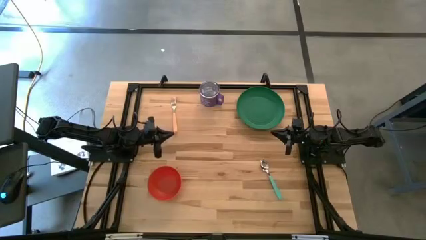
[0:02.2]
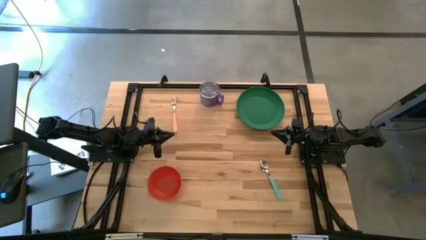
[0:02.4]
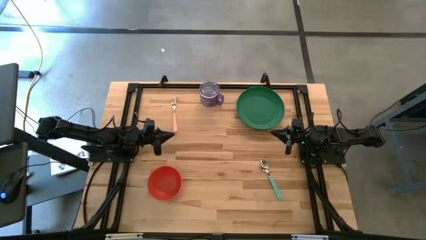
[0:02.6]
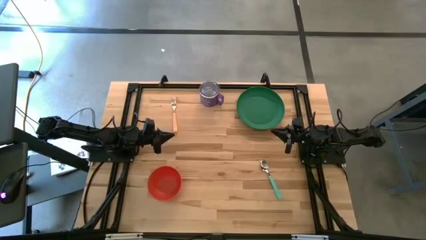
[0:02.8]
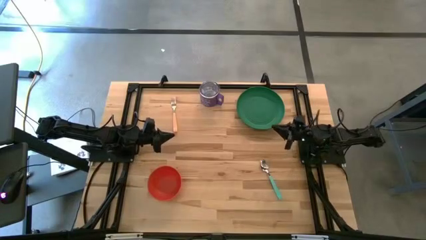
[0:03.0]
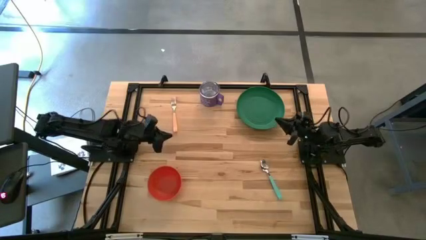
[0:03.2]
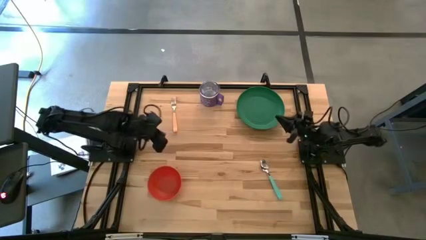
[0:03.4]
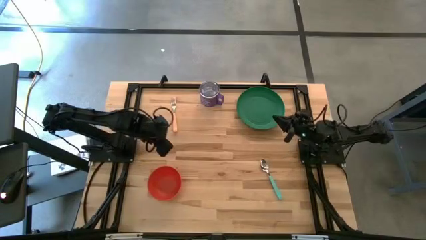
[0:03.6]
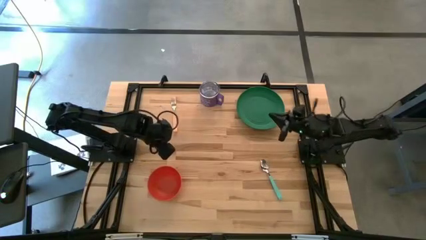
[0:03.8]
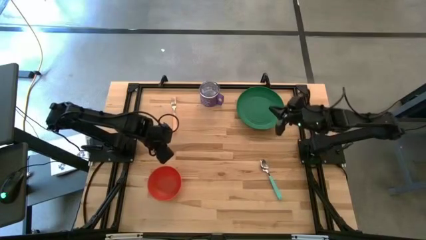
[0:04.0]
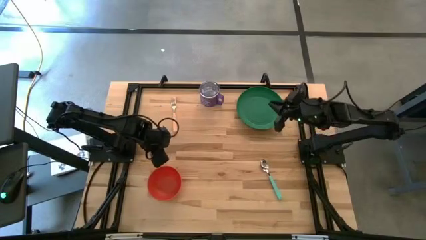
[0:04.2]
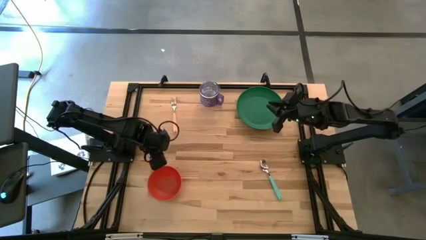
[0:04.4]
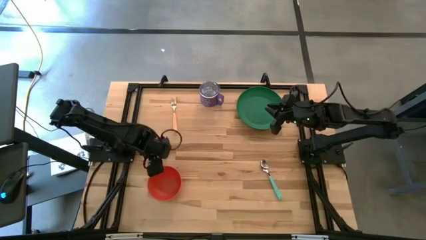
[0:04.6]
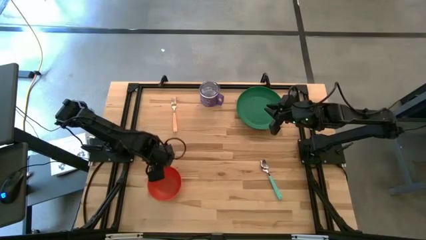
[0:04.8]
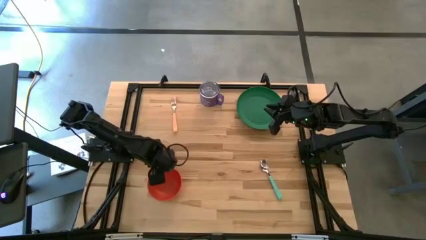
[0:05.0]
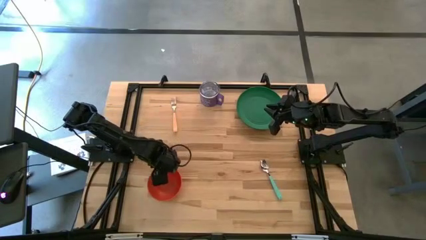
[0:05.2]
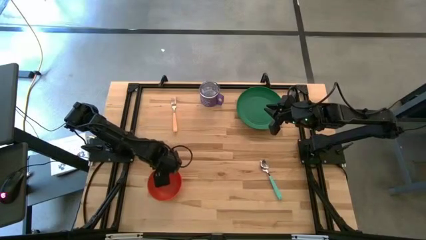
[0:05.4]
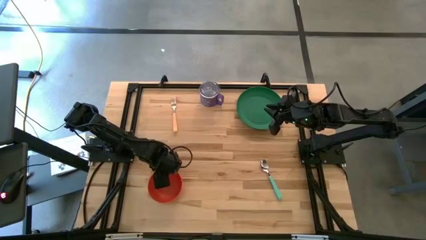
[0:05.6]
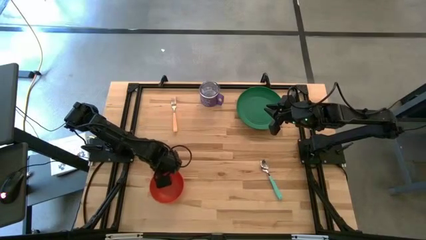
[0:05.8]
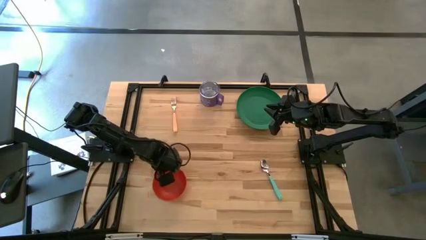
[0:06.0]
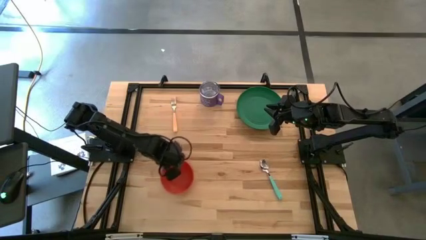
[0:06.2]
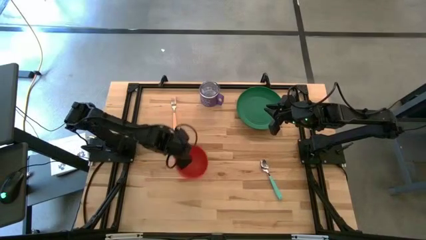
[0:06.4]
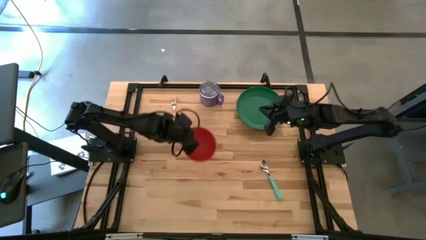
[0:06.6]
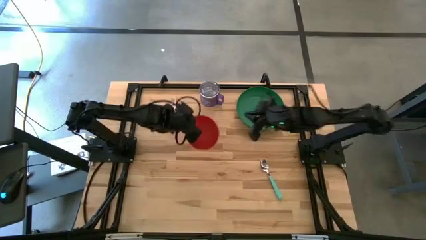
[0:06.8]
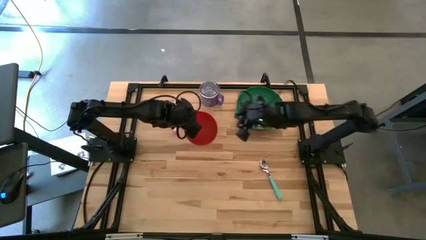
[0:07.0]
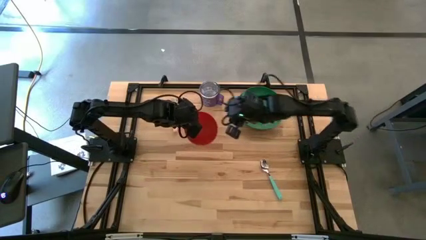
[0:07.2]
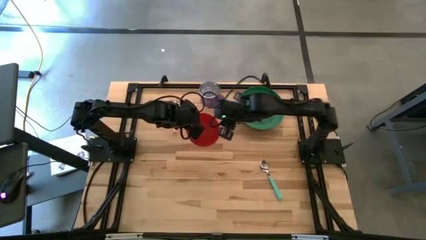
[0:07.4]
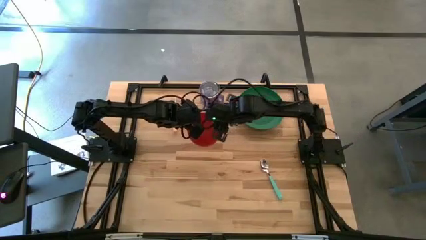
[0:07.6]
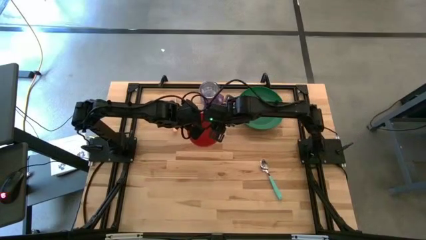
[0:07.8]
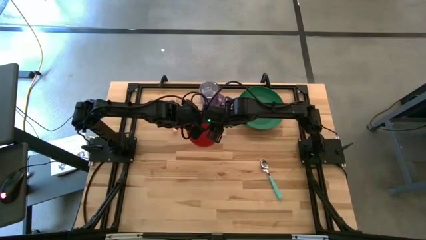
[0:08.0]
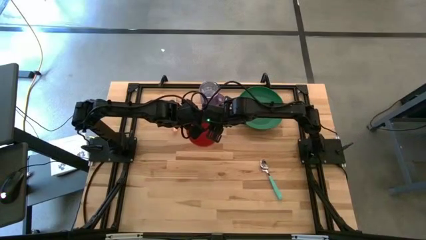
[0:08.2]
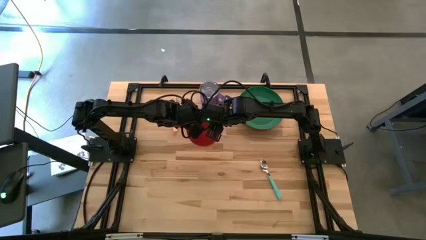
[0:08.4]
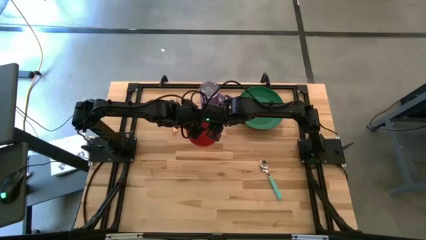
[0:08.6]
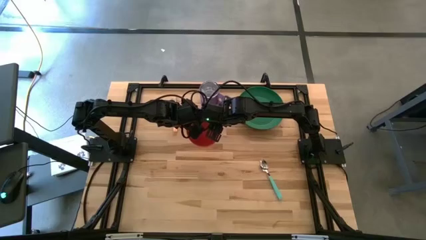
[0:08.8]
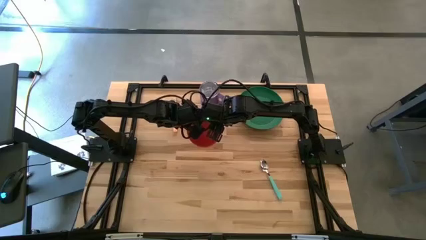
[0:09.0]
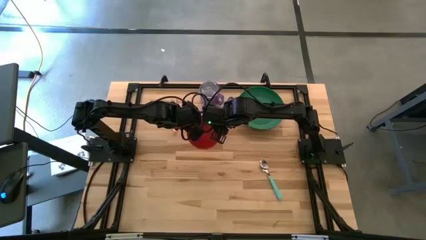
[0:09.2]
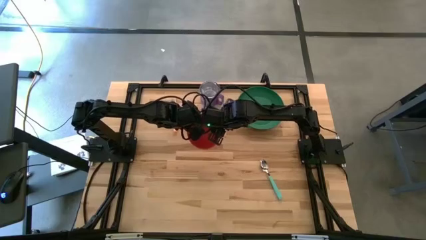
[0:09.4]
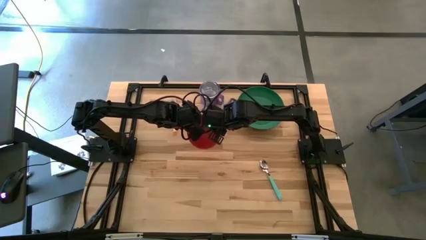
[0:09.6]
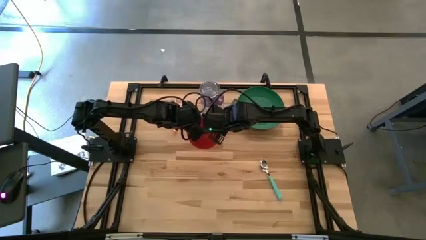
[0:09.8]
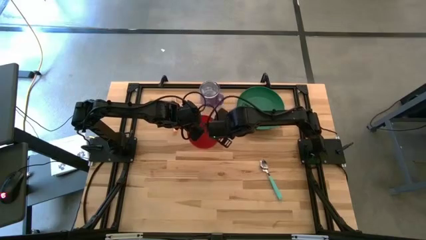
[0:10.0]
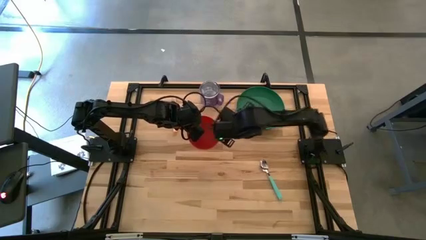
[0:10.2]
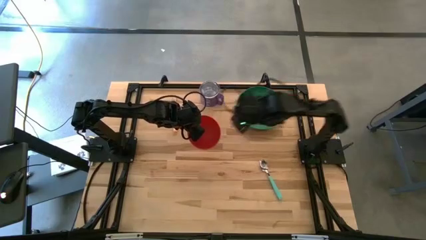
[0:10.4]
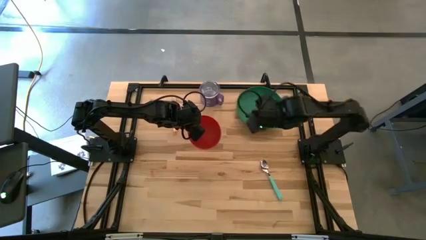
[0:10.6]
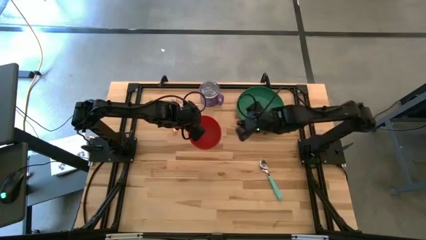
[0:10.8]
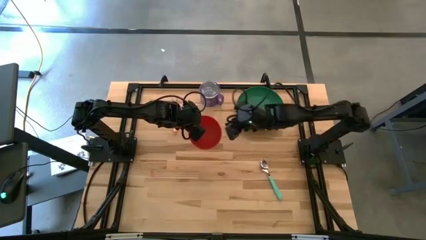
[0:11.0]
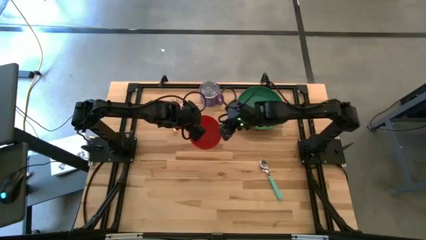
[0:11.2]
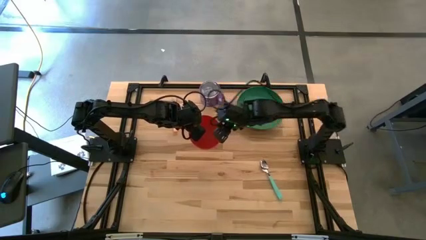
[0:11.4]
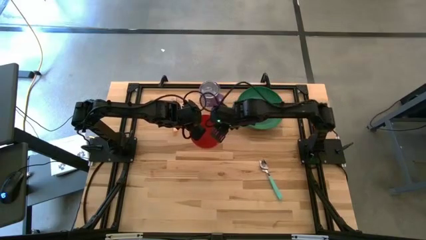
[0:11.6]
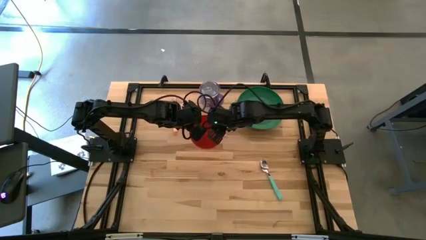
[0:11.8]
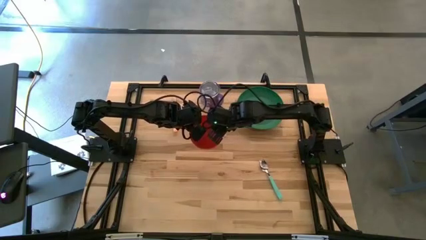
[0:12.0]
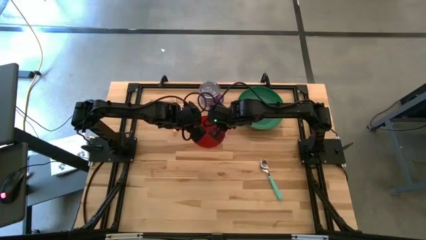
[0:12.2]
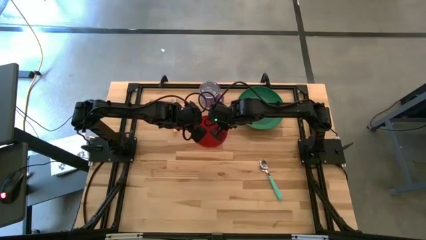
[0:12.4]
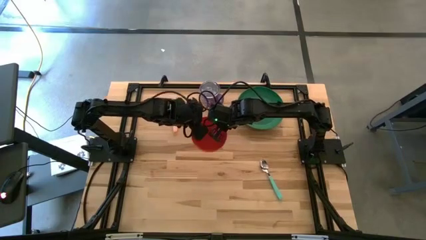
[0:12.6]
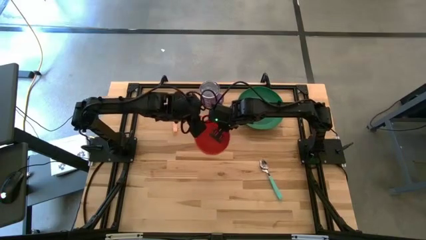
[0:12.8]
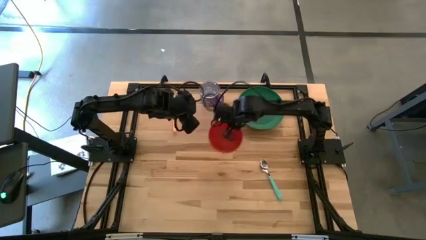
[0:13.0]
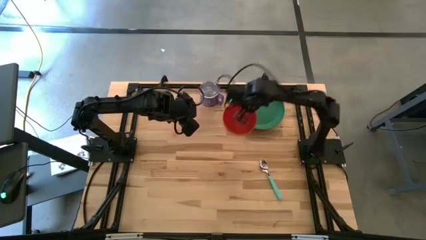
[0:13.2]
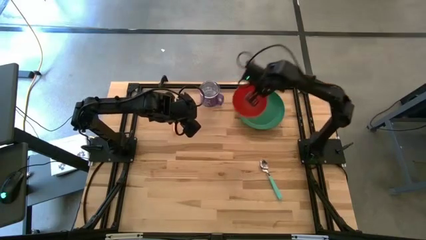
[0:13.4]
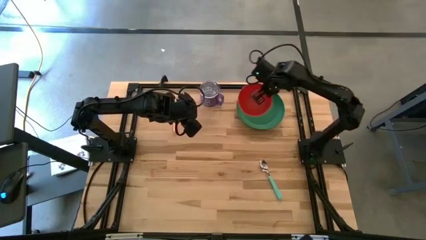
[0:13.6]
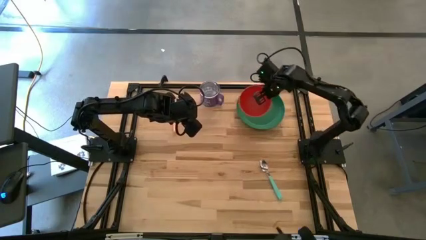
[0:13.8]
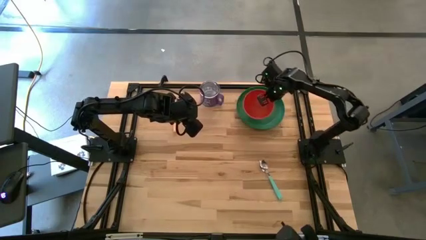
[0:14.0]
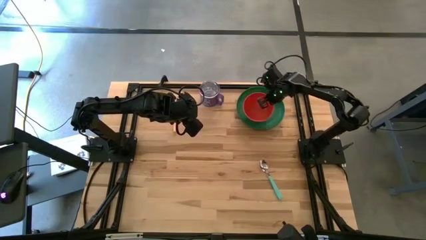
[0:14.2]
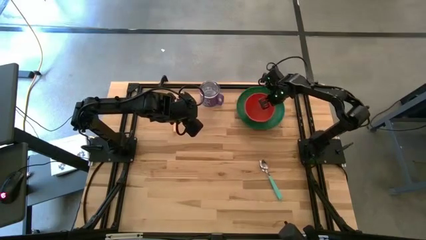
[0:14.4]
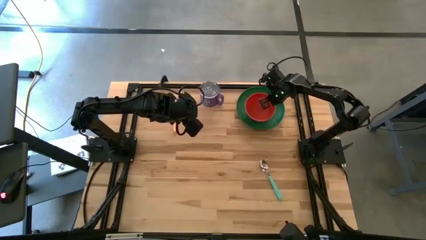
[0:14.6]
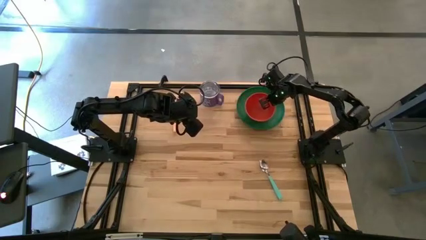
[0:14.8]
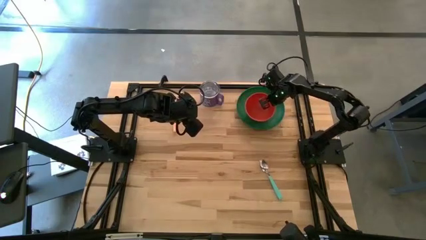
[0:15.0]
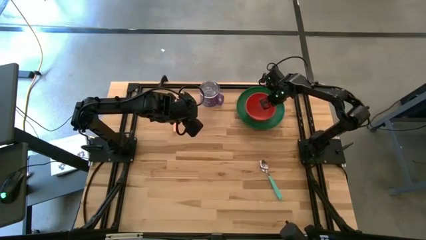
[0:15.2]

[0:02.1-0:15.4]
Task: Set table place
Put the orange bowl on the green plate
